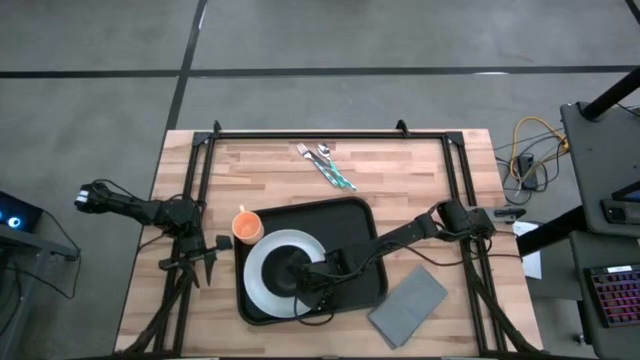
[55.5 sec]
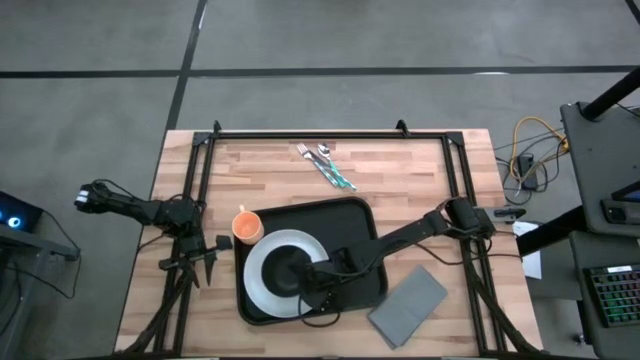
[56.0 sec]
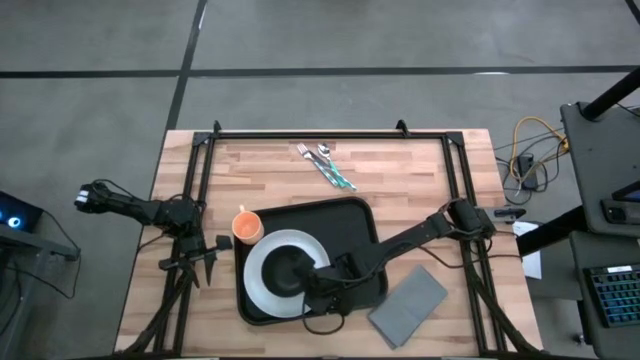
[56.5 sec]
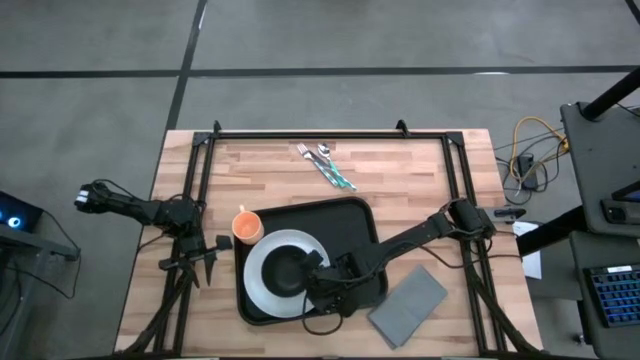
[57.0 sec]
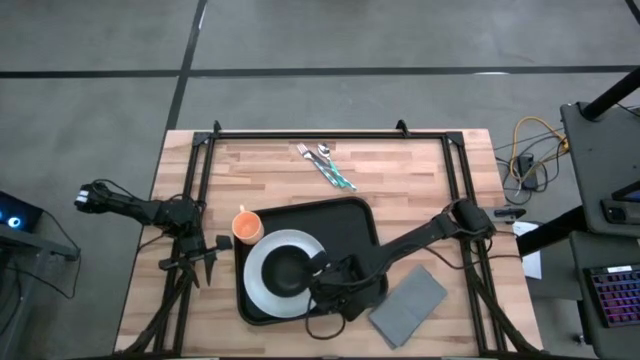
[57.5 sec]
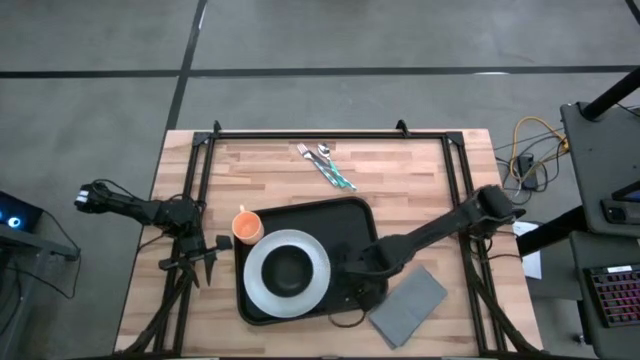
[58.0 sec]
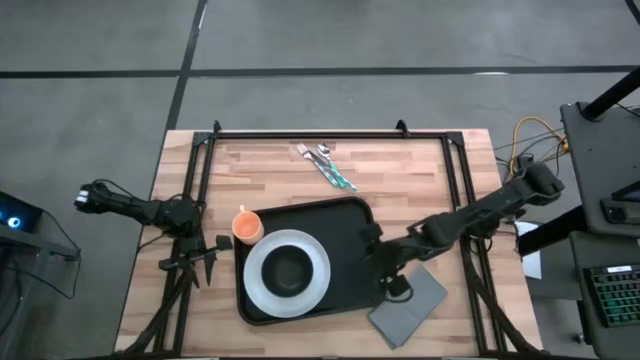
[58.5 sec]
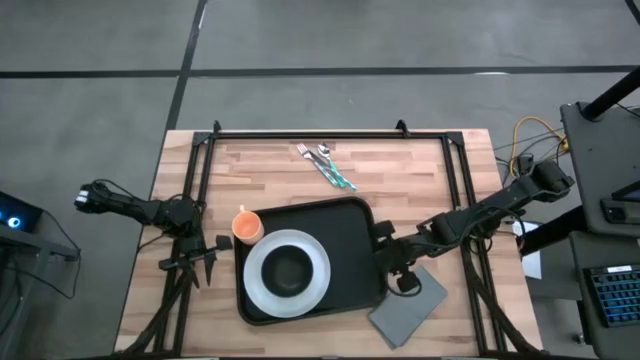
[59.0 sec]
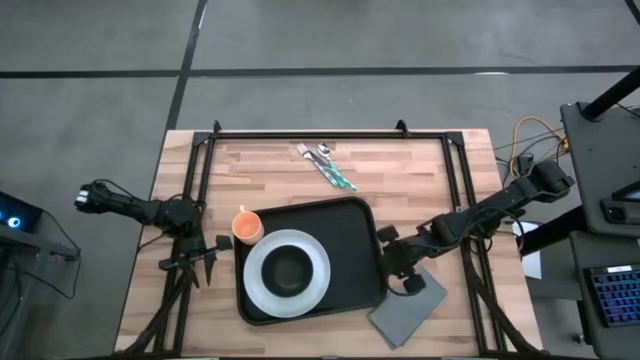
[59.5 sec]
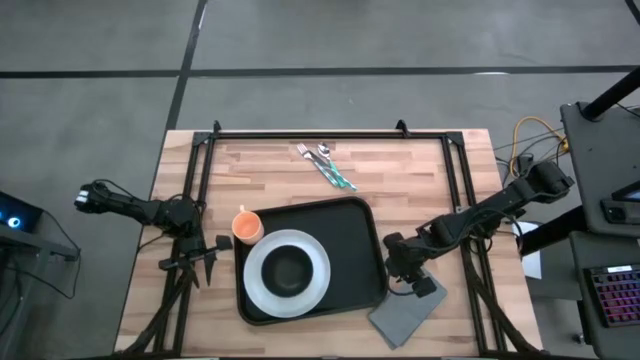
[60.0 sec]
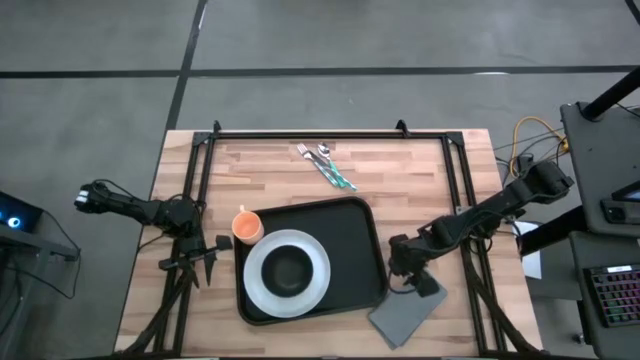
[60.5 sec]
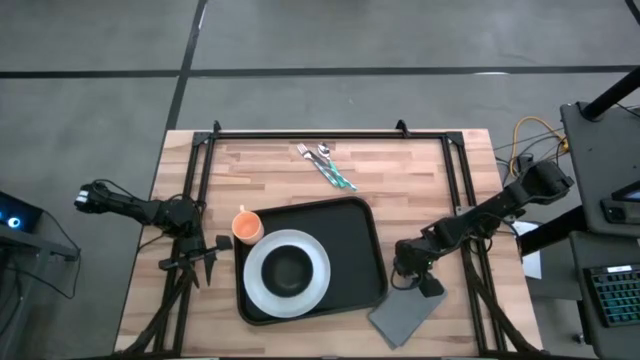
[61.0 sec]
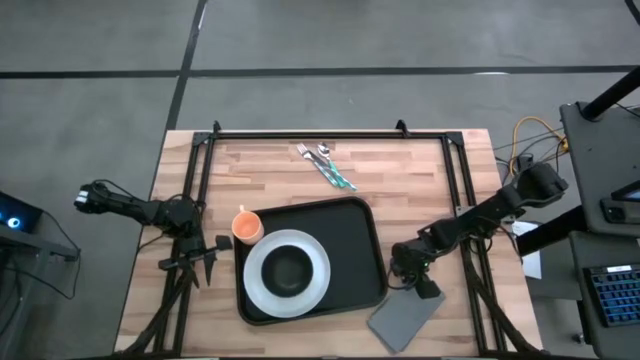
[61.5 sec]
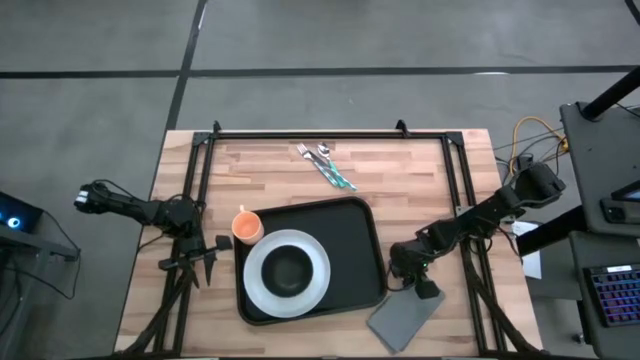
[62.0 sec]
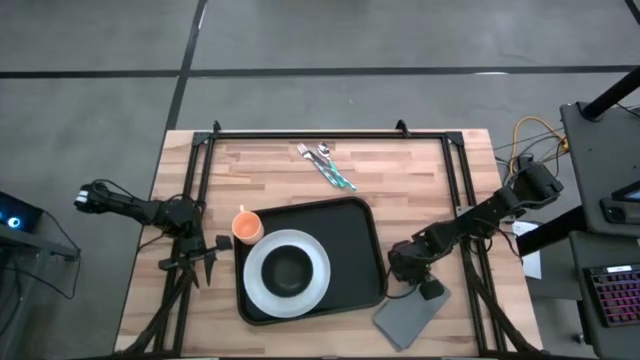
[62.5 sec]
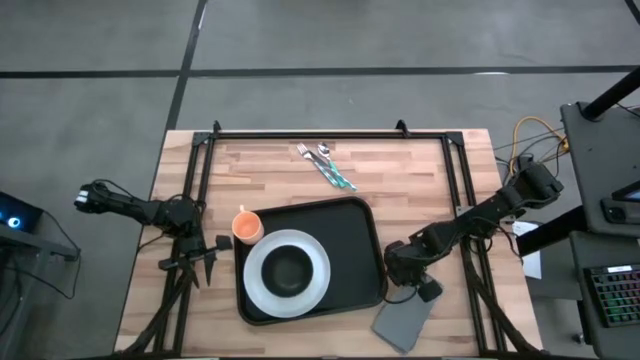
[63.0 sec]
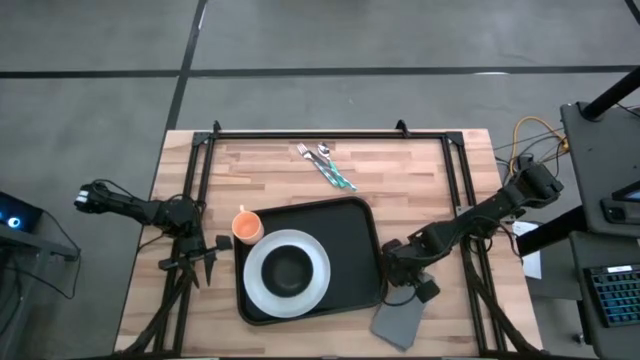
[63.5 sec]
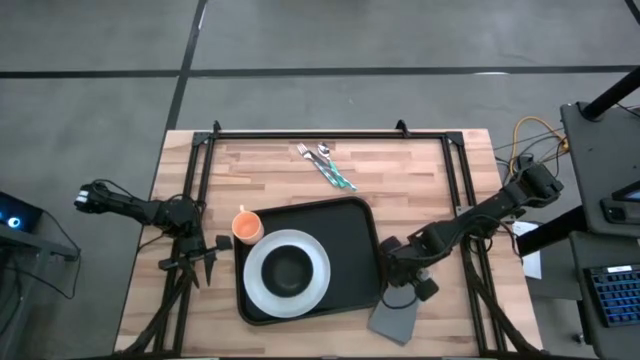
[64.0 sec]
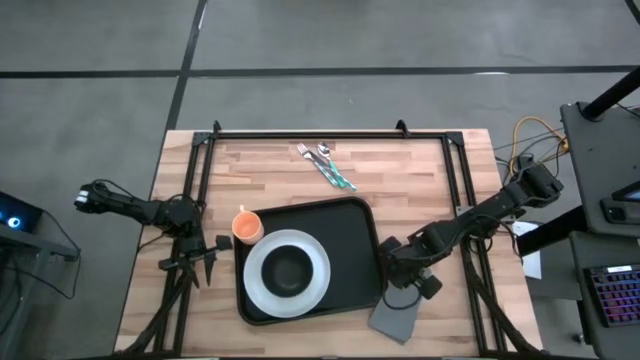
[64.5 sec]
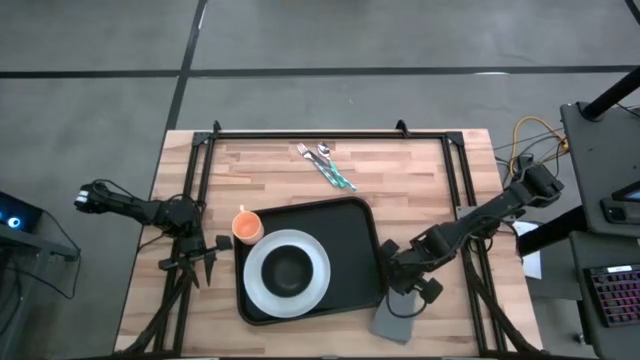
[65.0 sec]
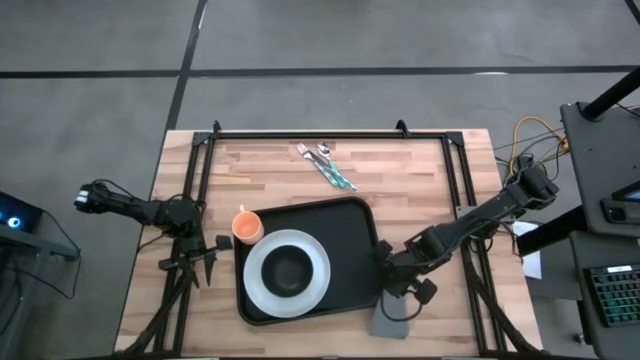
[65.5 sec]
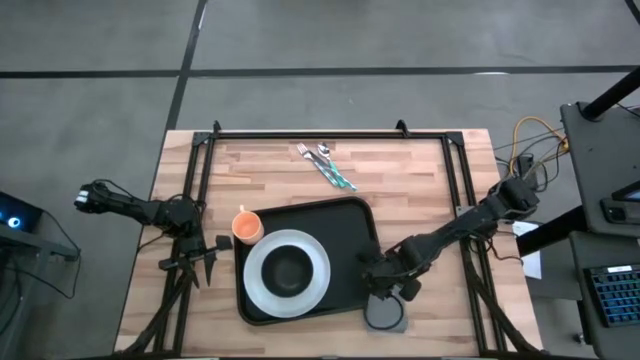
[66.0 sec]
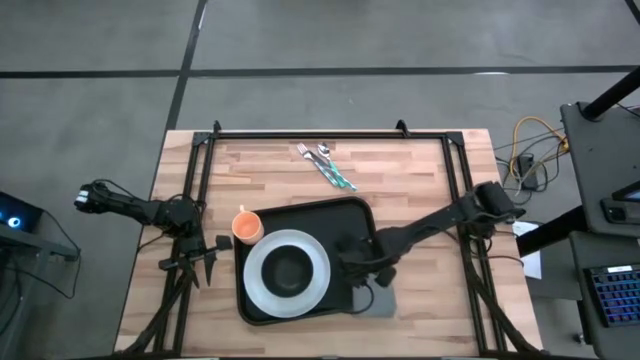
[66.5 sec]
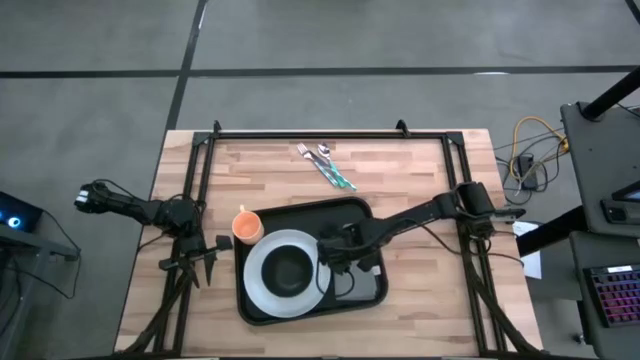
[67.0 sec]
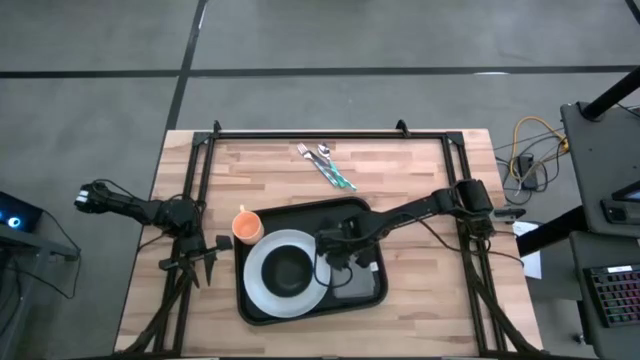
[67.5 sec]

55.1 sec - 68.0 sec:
Task: Set up tray
Put the table gray napkin on the serving tray

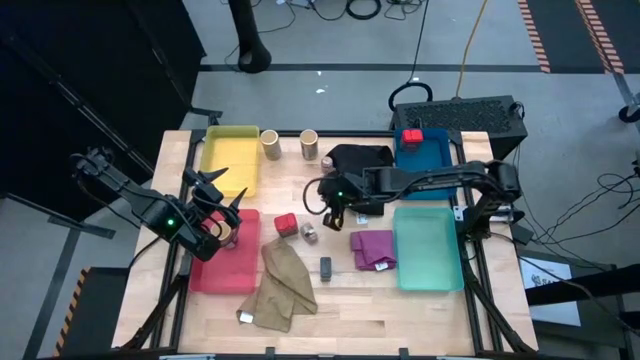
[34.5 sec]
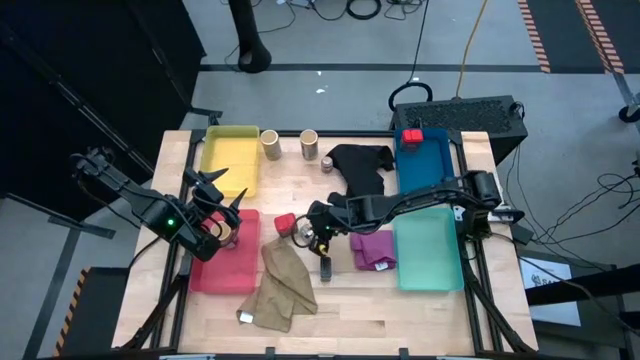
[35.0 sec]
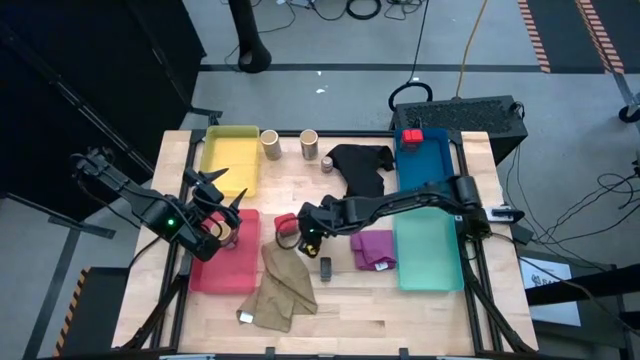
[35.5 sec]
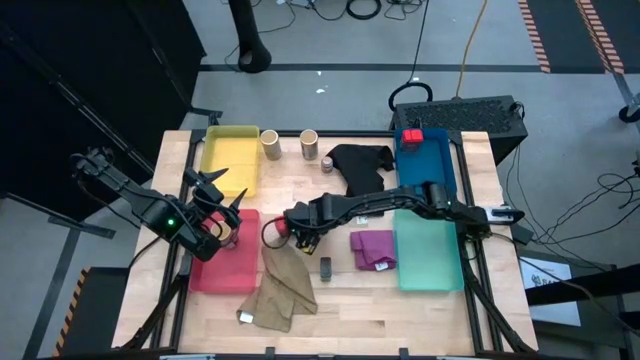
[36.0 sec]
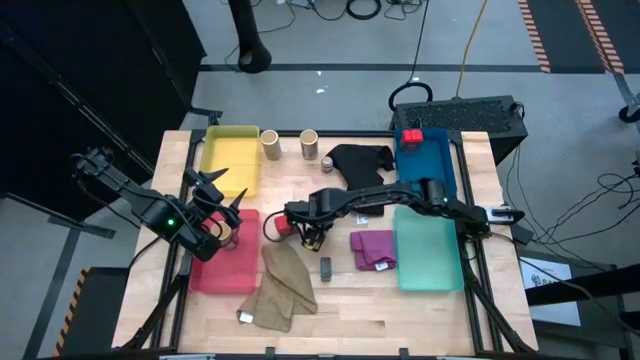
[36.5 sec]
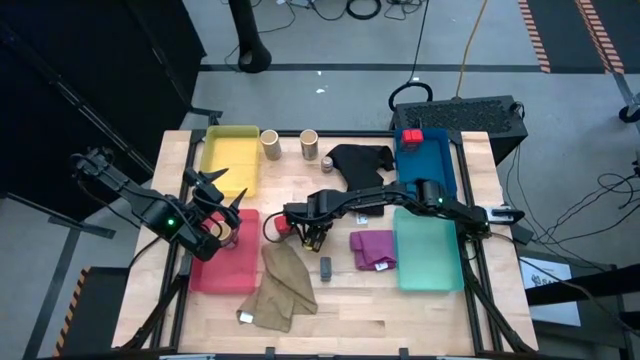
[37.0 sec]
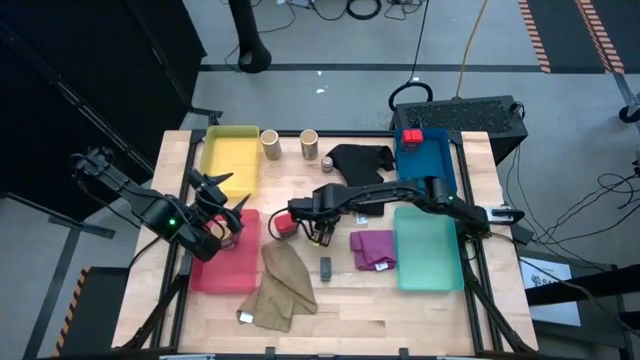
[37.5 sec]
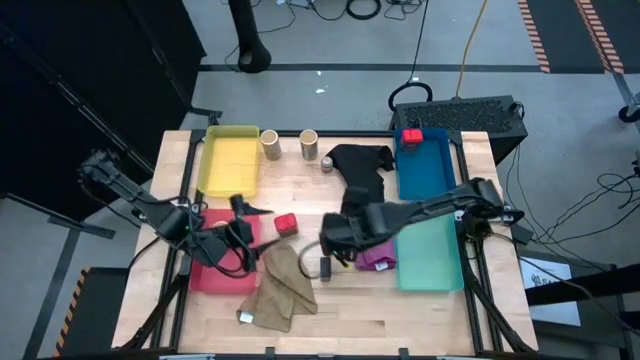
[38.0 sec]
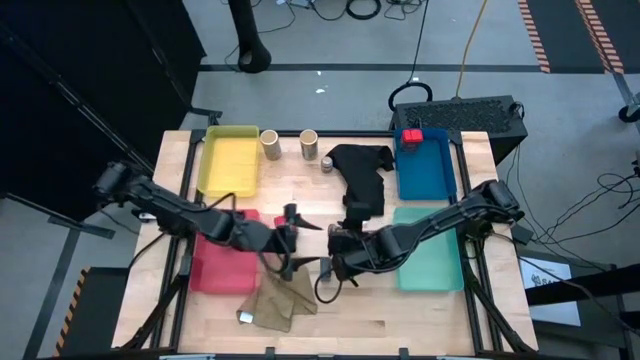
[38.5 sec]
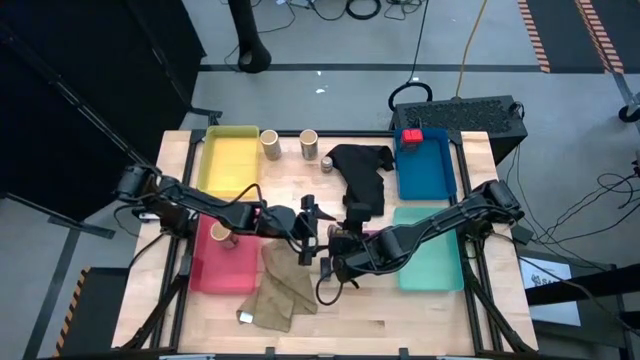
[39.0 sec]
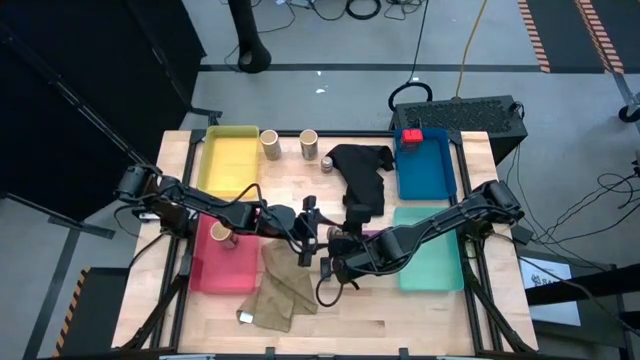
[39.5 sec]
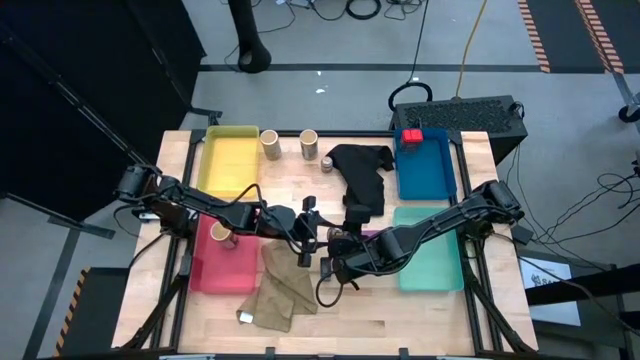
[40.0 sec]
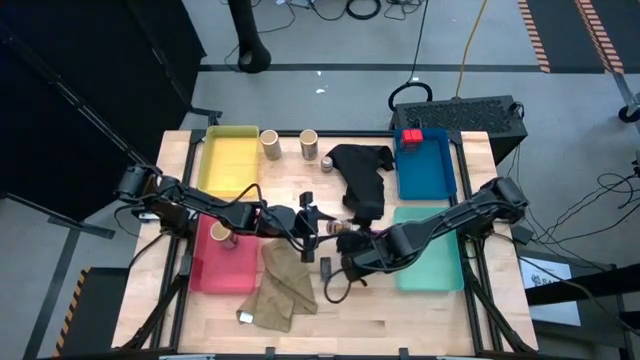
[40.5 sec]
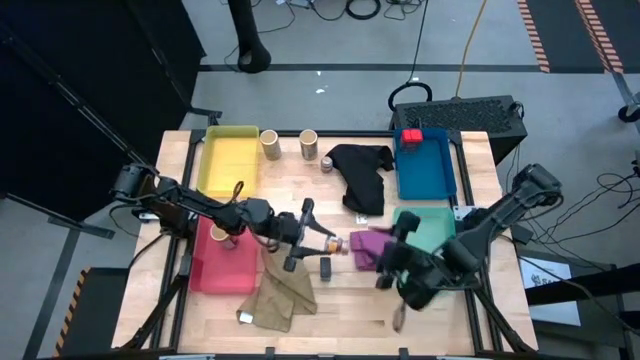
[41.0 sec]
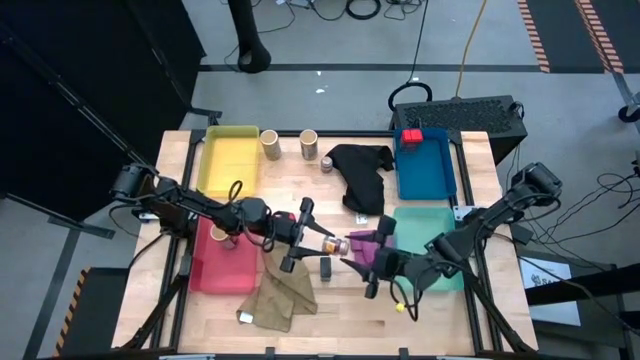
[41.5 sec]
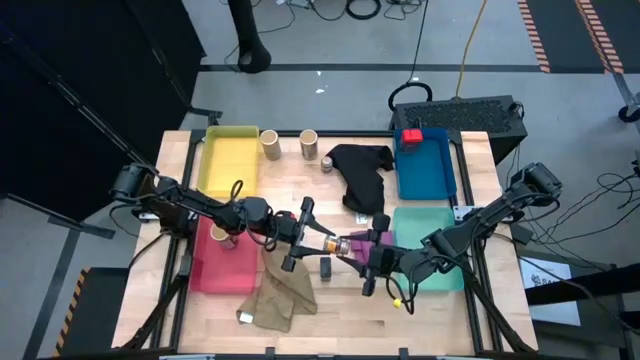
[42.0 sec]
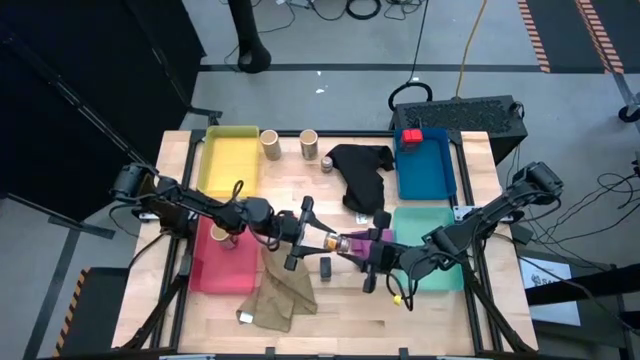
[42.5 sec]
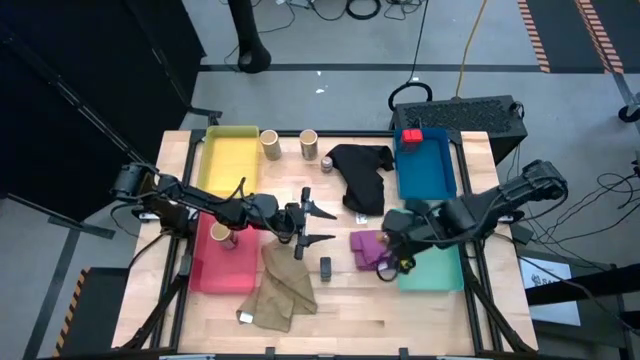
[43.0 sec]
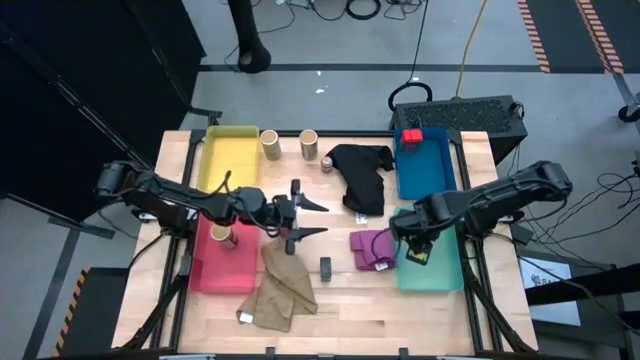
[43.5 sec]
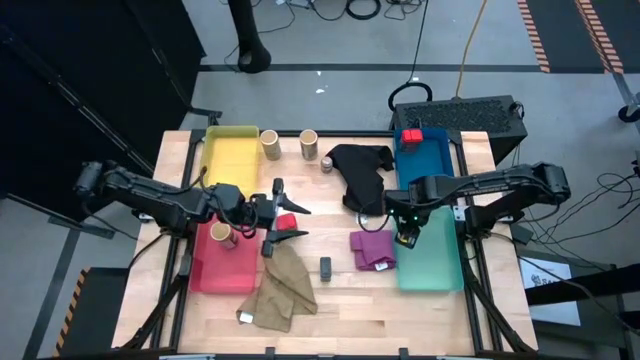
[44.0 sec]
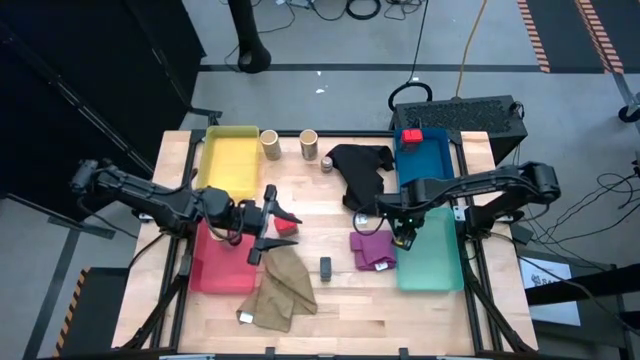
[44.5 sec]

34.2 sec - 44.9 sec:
Task: Sort spices by type
Put the bottom brown seasoning bottle into the green bin
